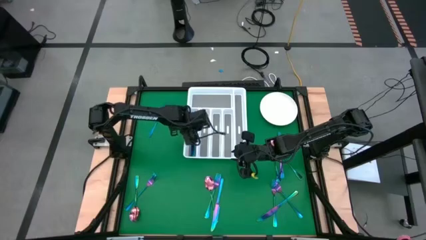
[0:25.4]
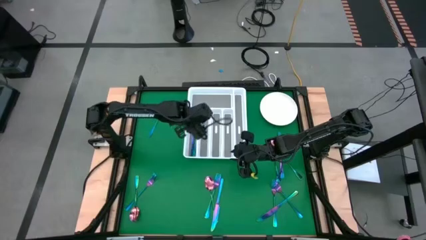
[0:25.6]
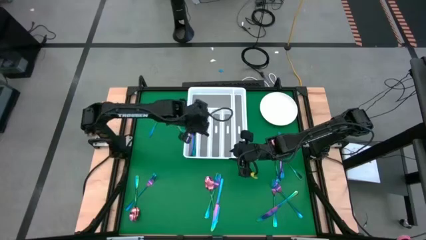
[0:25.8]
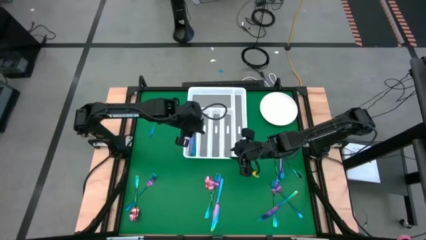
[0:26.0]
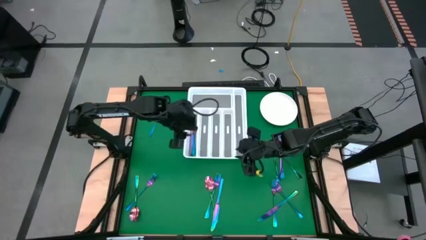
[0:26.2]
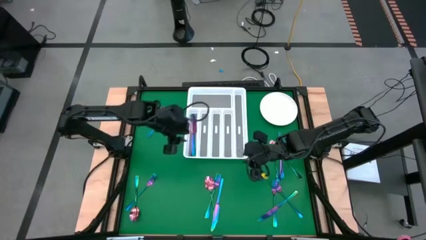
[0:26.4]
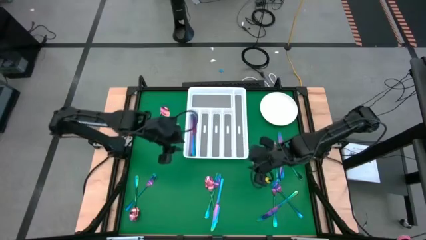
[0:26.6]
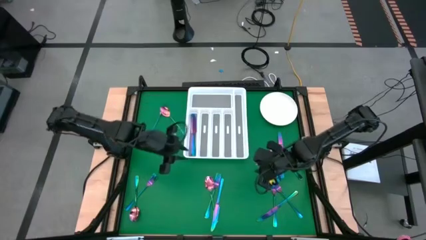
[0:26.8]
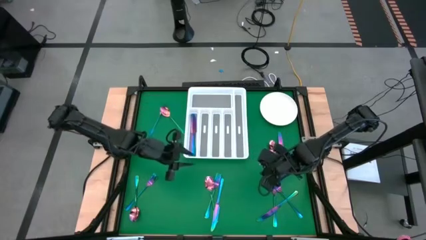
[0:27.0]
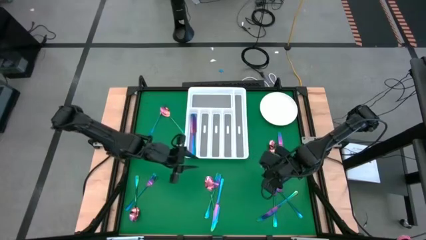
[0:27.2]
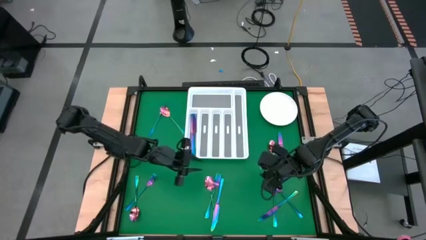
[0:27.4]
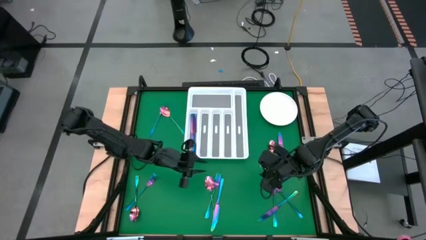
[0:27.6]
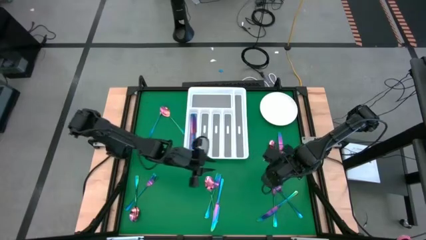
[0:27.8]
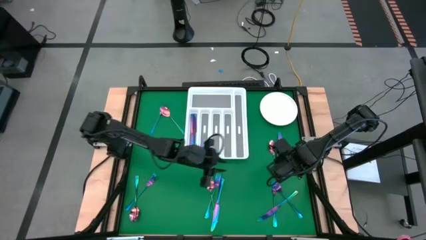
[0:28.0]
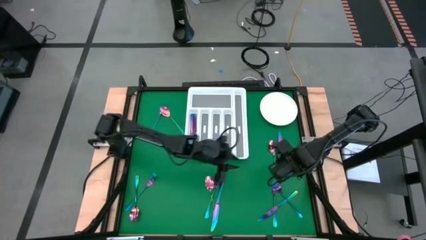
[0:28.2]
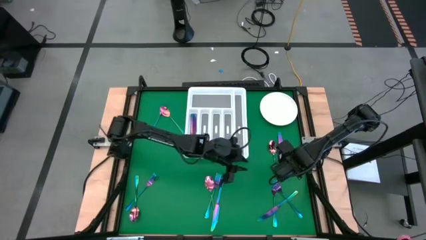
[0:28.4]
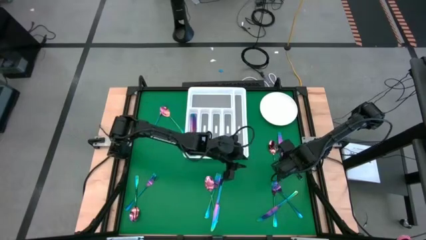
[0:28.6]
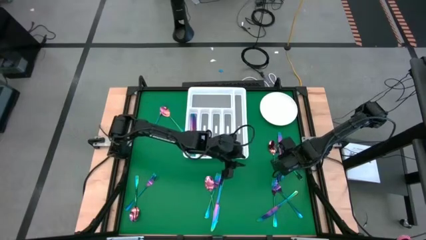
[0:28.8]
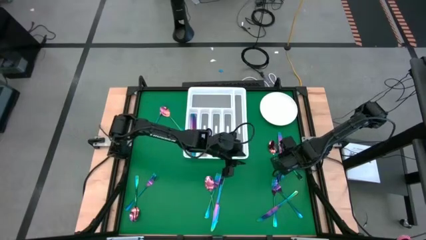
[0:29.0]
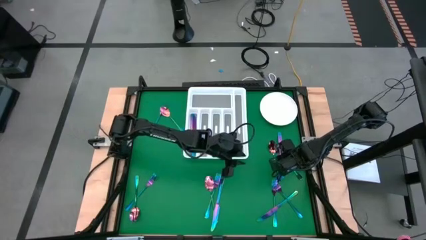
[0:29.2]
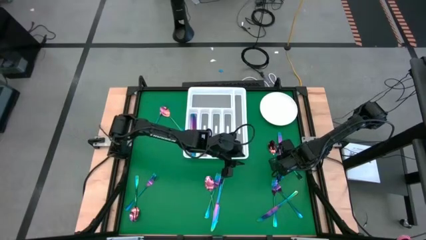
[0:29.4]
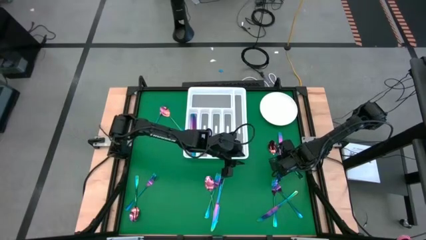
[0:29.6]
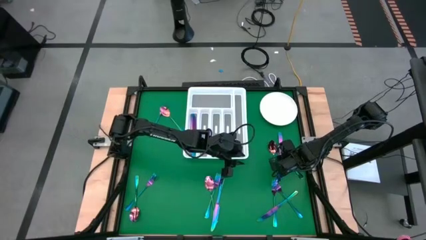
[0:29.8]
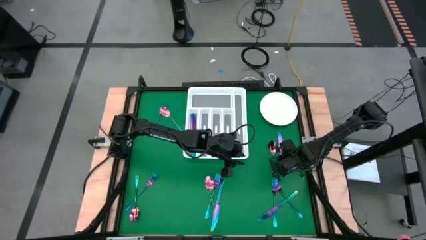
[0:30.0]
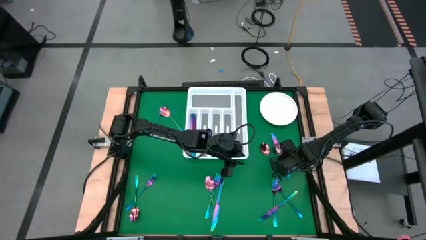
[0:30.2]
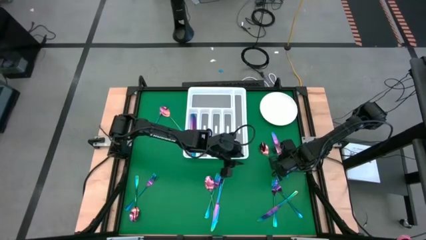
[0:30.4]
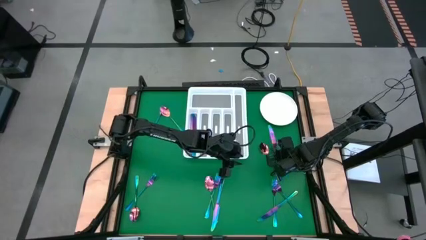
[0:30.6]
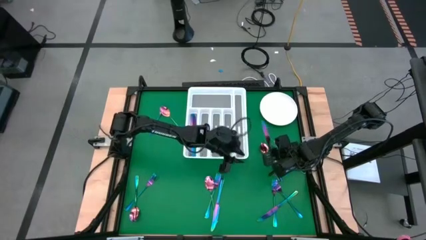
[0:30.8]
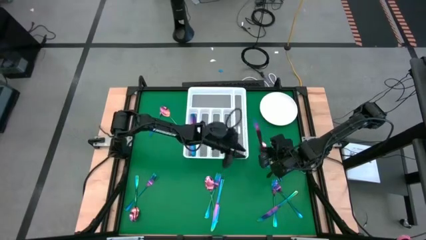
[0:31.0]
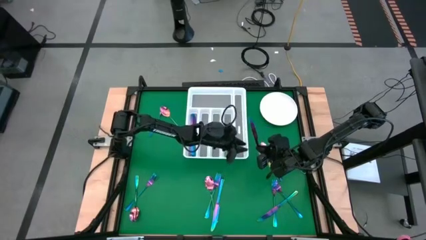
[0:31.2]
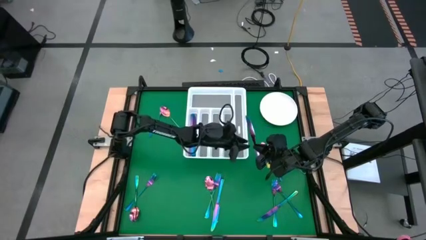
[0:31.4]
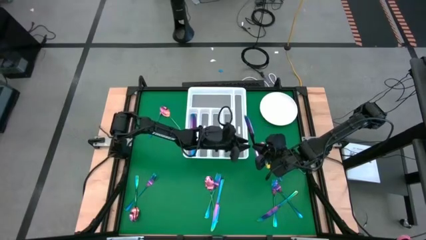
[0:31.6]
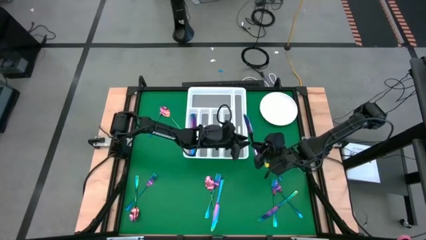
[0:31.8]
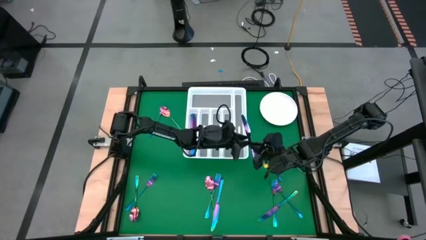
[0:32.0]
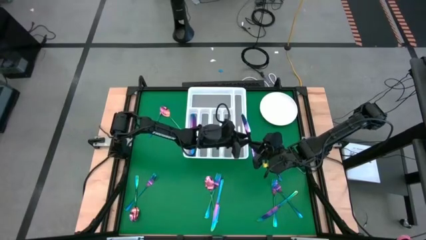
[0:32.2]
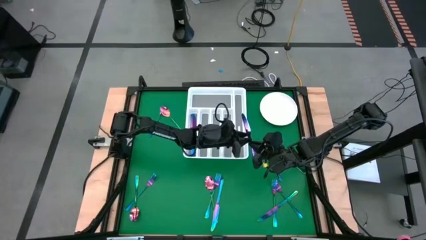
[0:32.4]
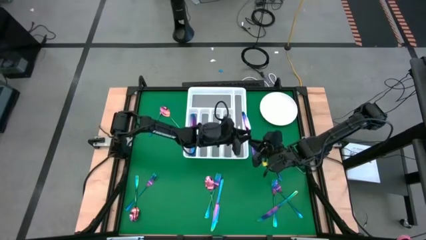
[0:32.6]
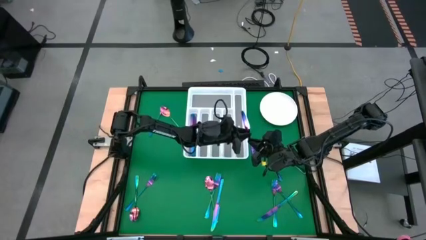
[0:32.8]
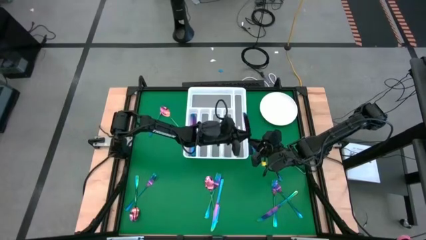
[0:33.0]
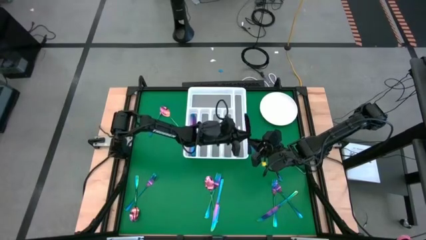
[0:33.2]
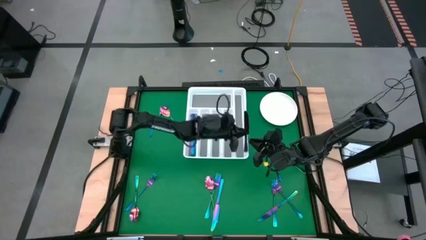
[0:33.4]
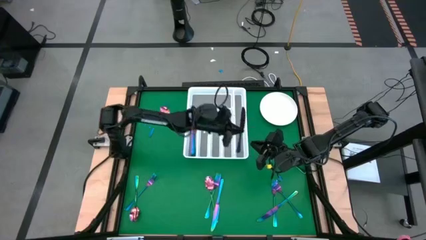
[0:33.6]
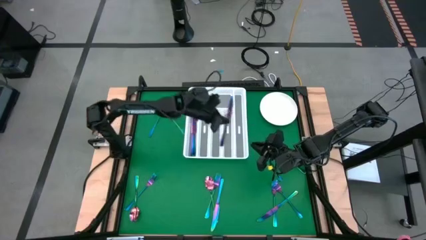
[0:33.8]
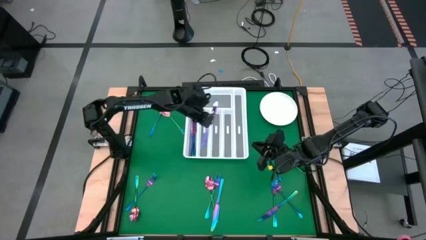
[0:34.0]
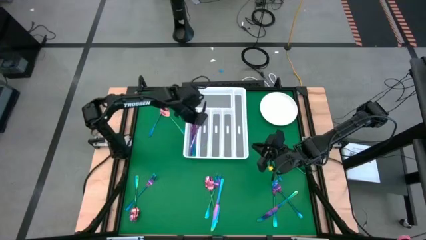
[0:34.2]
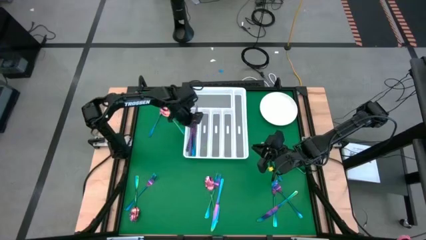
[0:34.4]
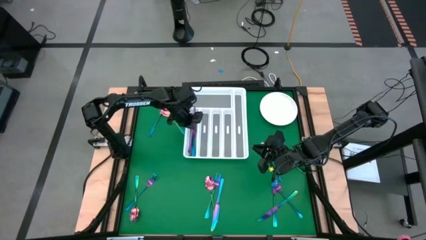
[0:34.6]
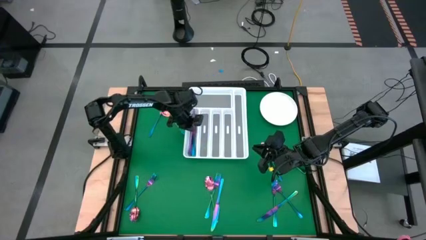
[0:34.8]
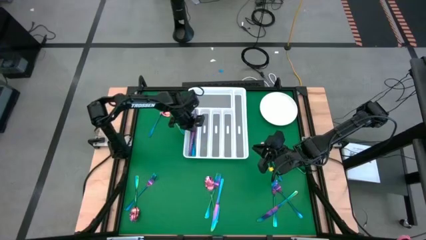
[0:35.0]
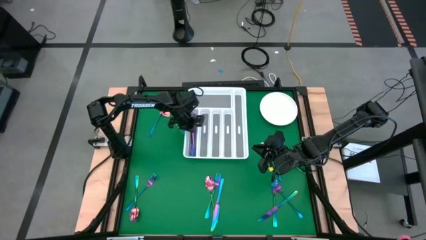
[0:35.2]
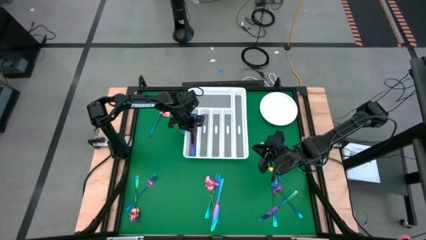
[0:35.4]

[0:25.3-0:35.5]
Task: Sort silverware
Put the blue table knife into the silverware tray
